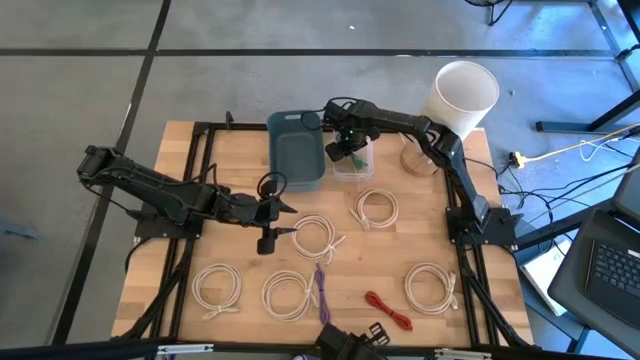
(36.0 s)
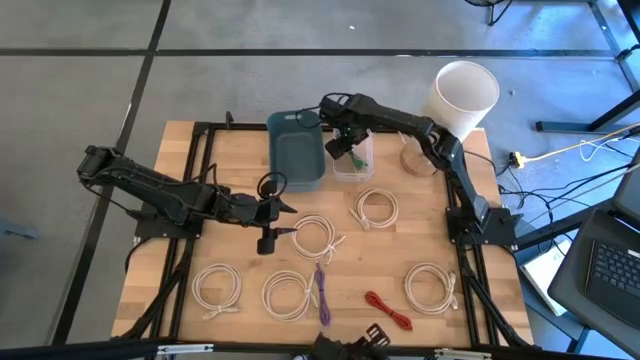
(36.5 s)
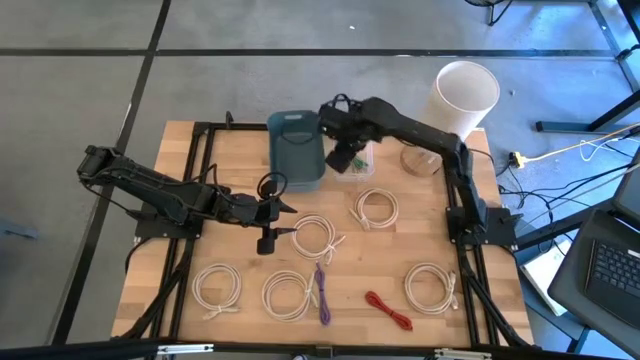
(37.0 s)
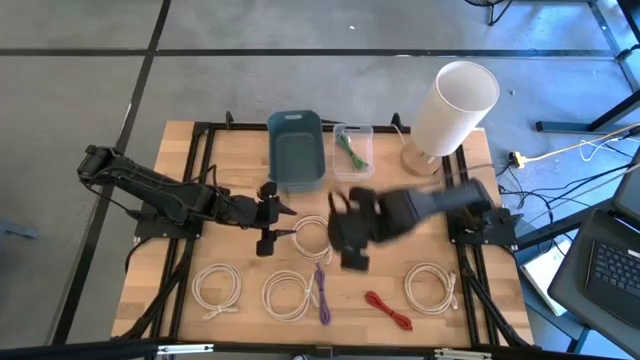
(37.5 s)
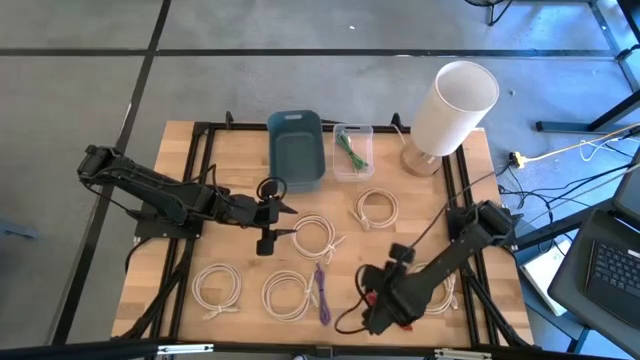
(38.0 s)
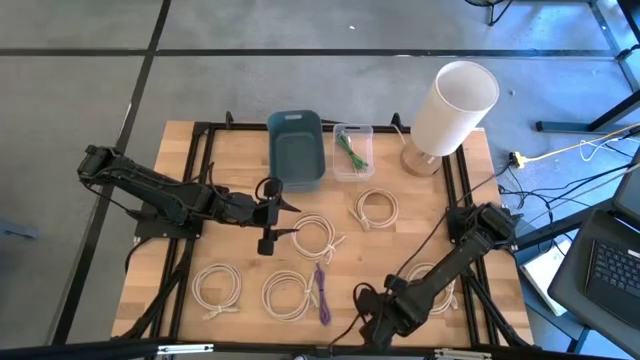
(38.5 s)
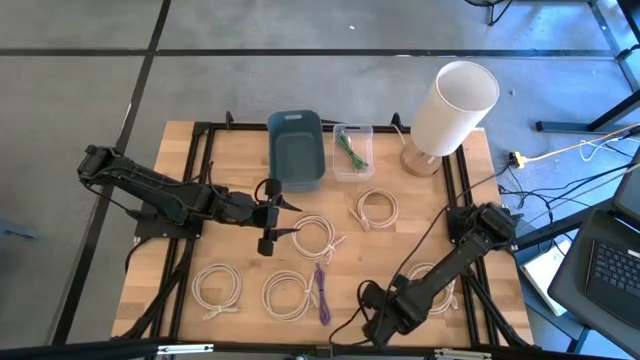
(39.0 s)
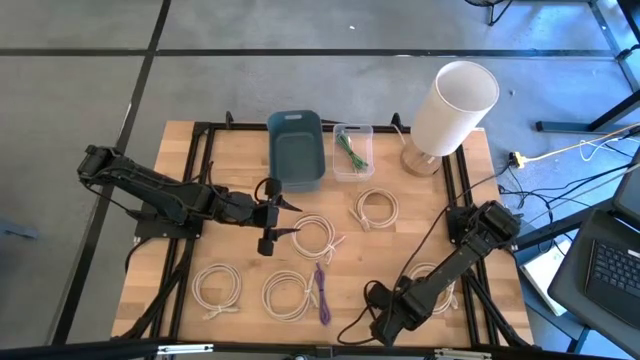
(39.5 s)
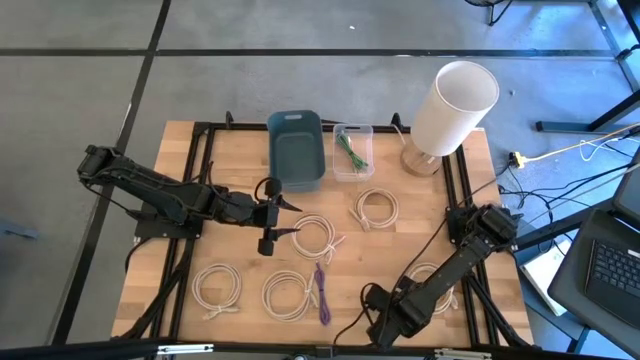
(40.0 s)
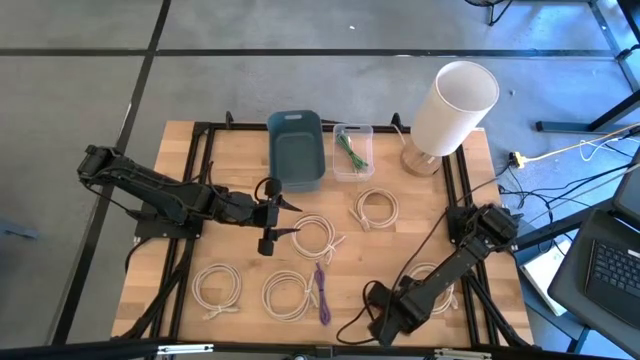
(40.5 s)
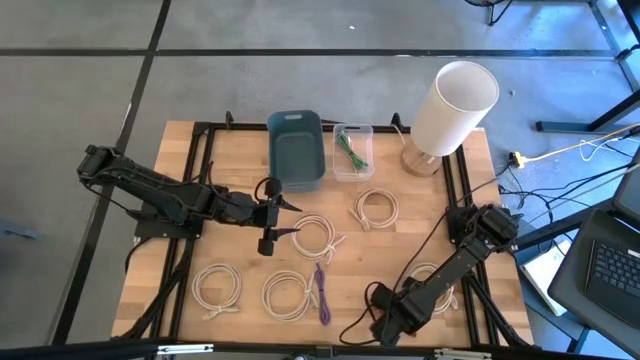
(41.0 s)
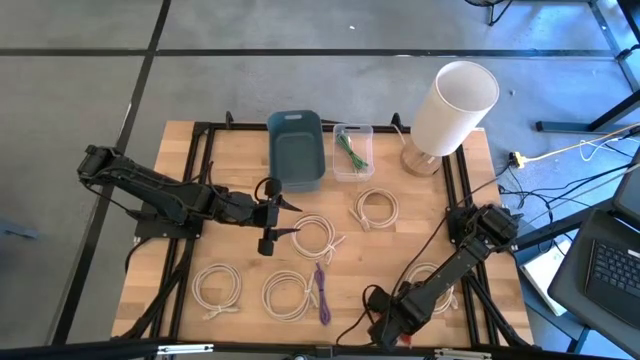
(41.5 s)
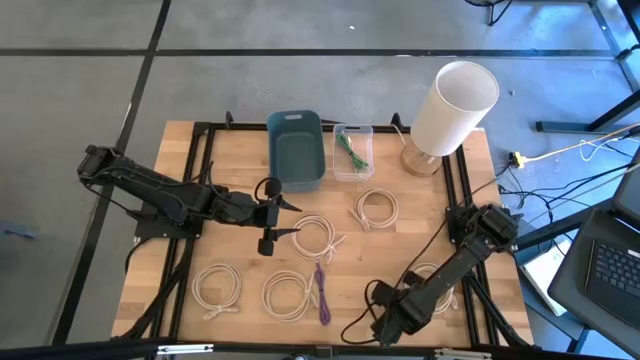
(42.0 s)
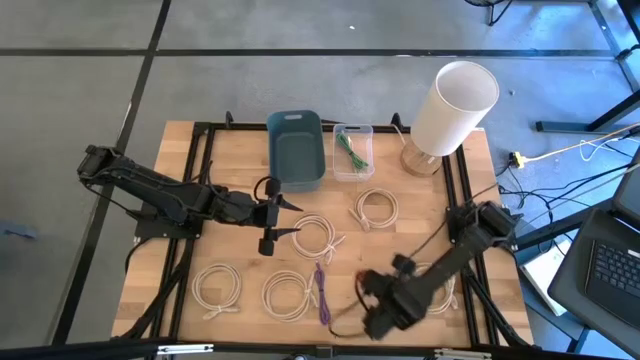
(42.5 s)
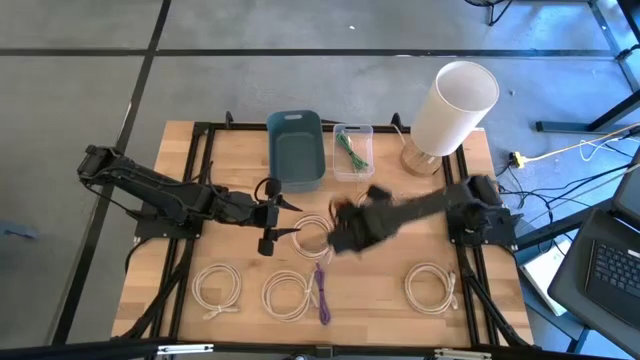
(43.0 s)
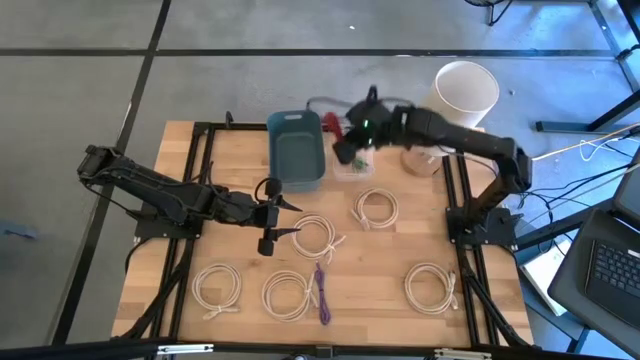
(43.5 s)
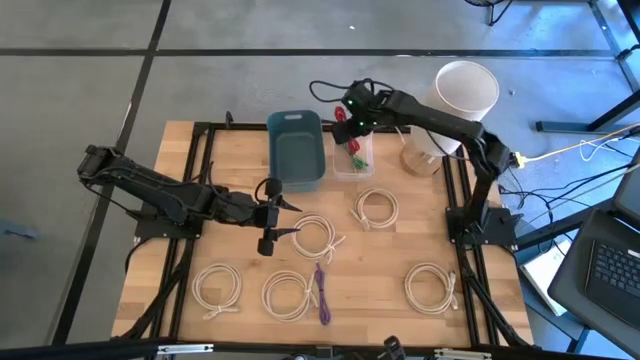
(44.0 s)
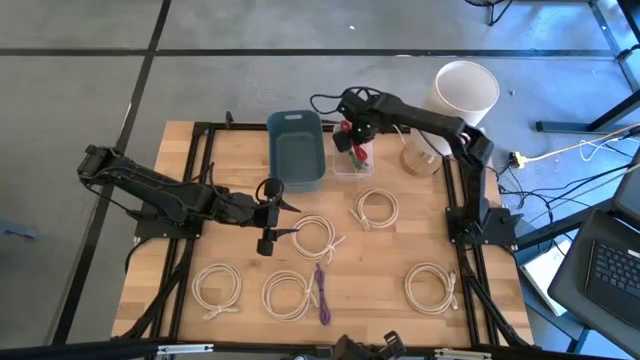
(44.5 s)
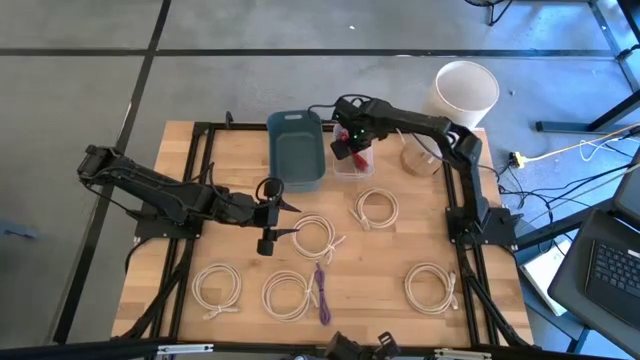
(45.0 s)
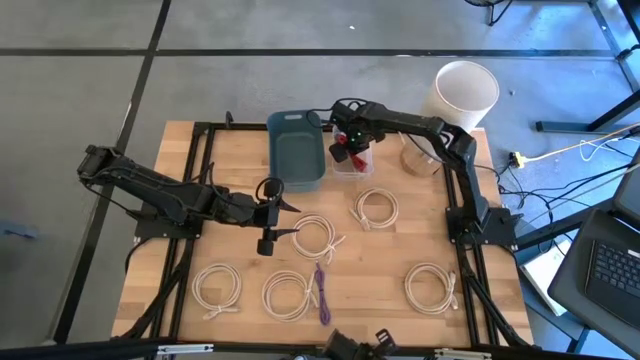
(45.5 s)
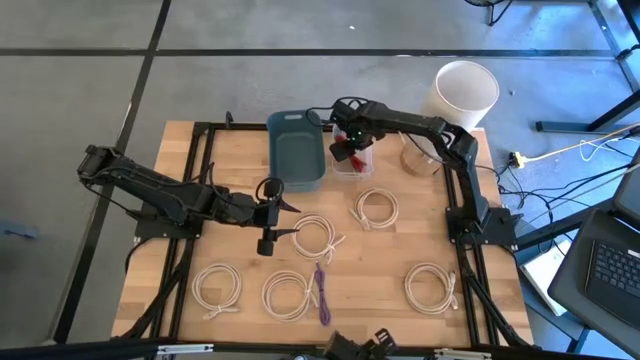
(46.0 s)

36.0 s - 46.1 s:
Put the red charger cable into the transparent bin

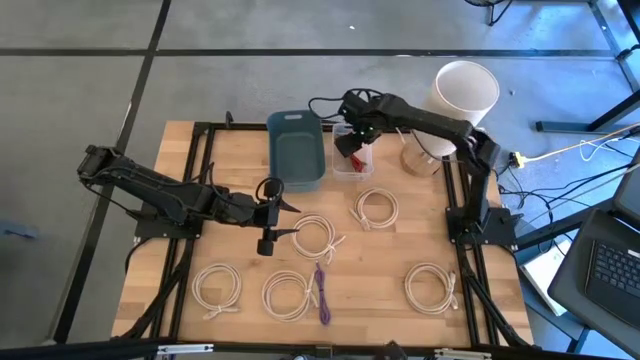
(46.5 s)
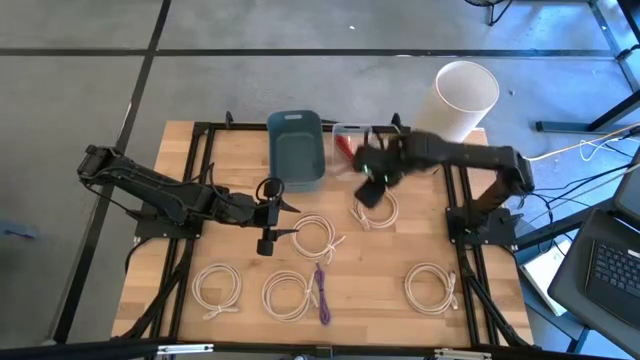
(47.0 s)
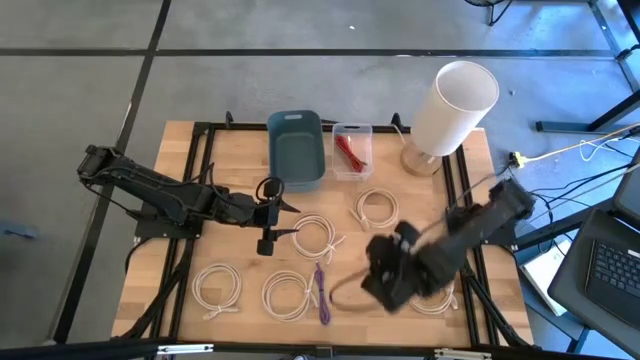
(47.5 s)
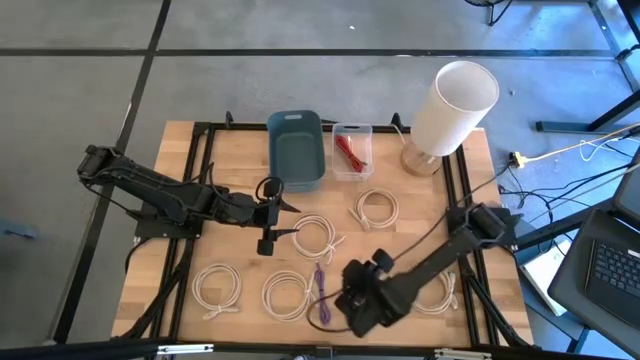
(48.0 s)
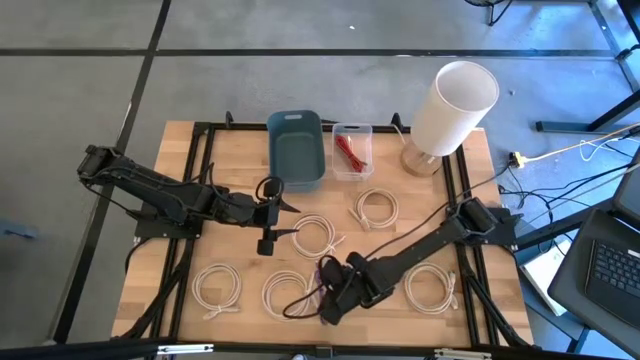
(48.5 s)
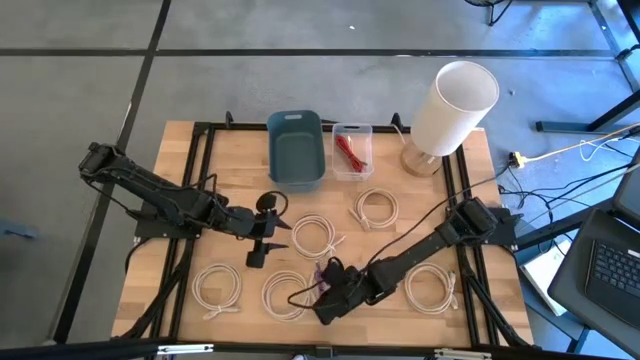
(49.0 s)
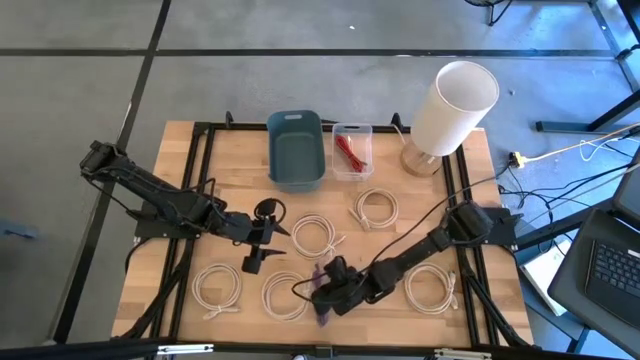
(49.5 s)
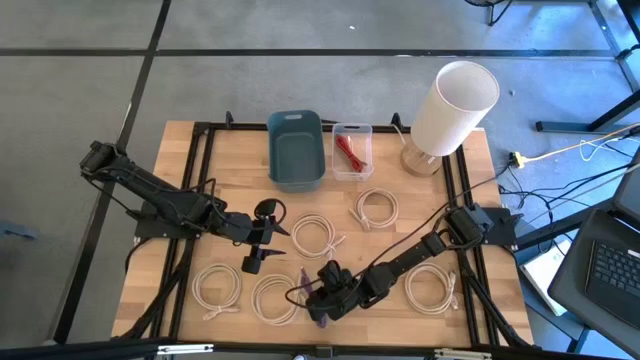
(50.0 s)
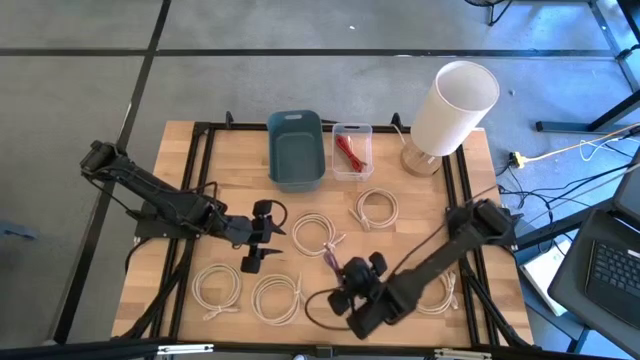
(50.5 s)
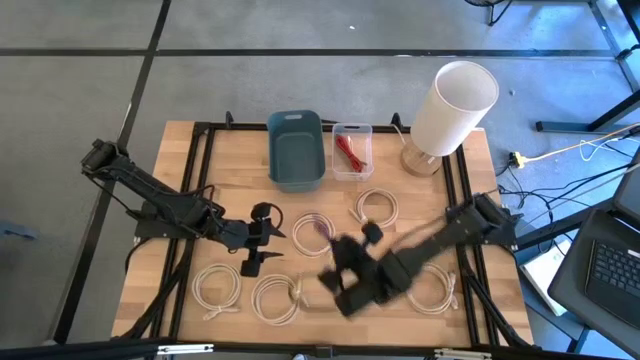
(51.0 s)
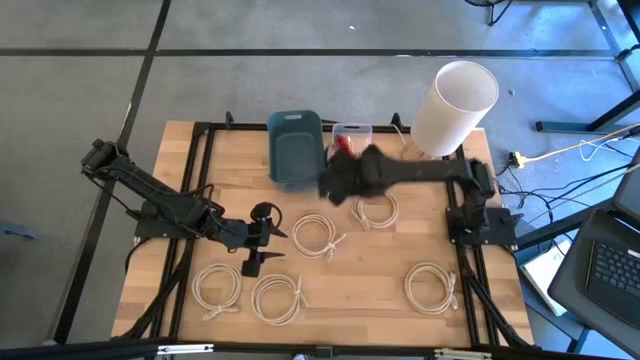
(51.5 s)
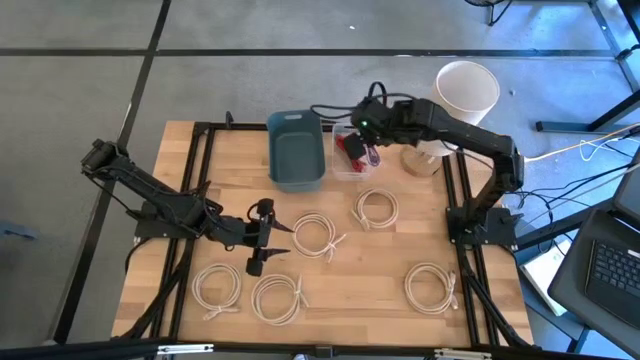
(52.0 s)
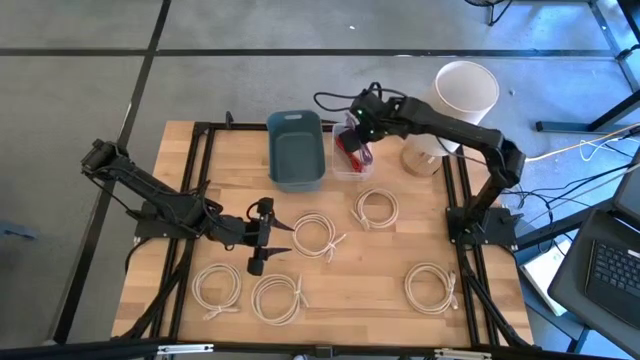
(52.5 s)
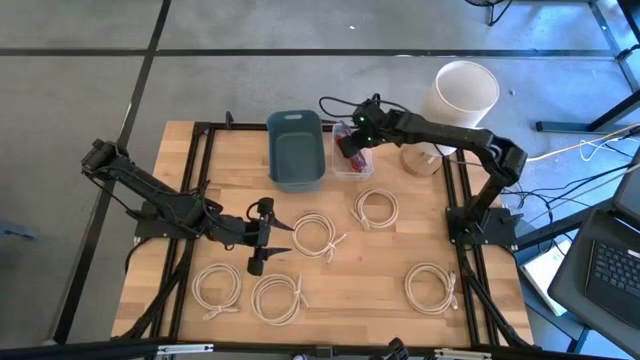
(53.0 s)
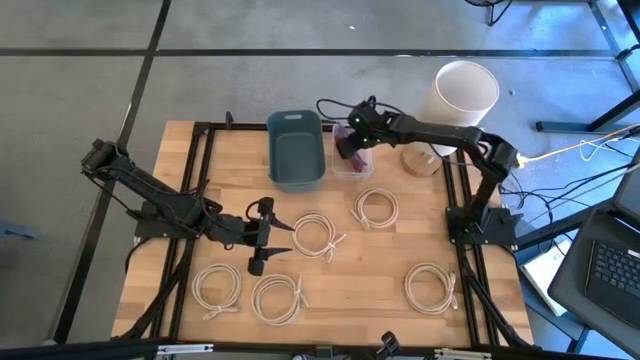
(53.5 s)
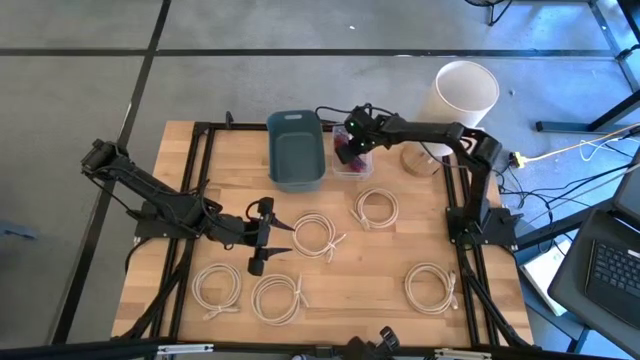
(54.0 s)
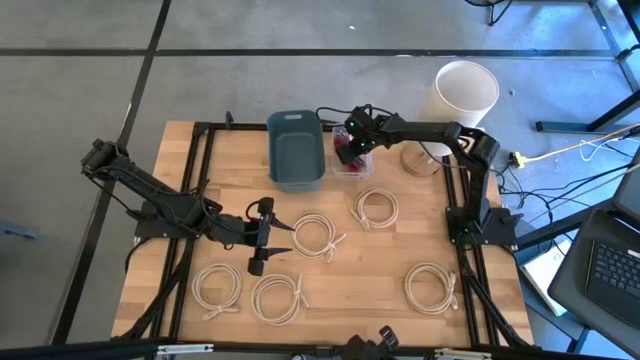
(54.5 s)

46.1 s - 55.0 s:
Put the purple charger cable into the transparent bin
